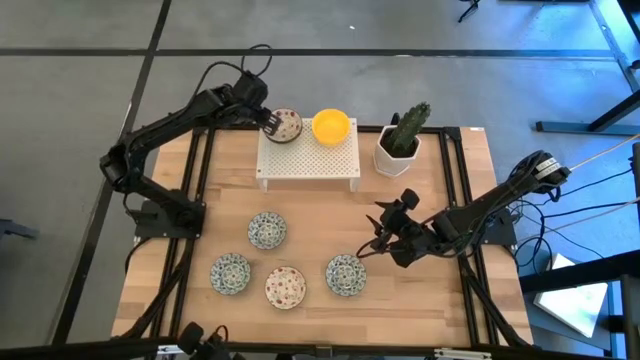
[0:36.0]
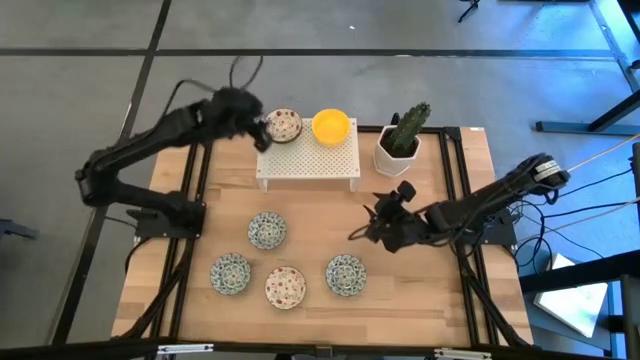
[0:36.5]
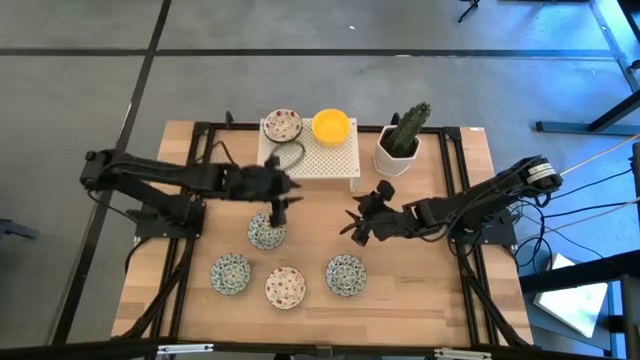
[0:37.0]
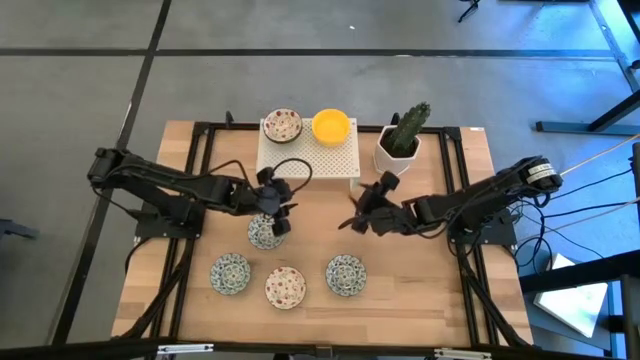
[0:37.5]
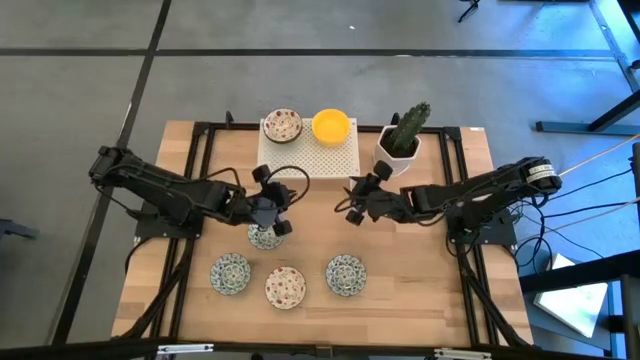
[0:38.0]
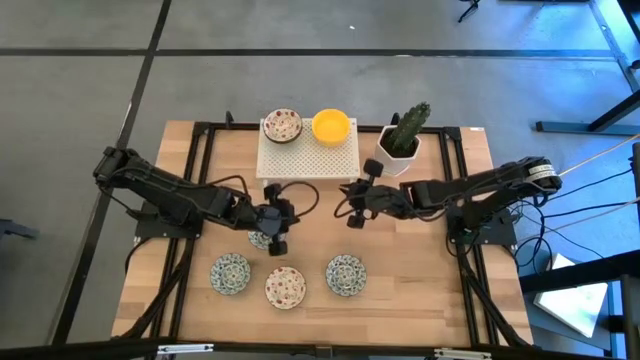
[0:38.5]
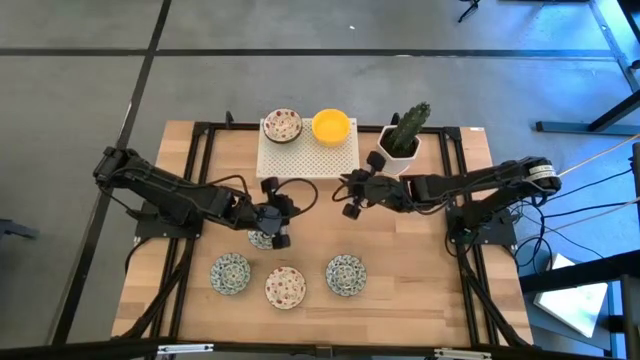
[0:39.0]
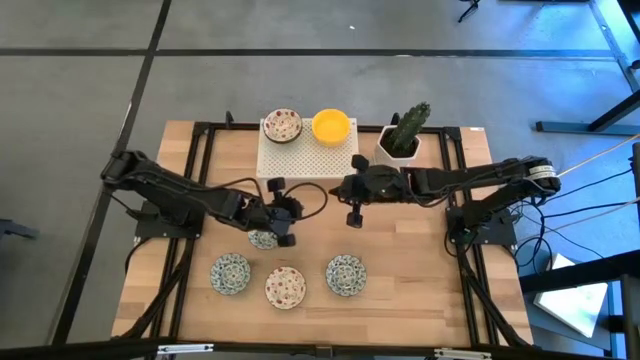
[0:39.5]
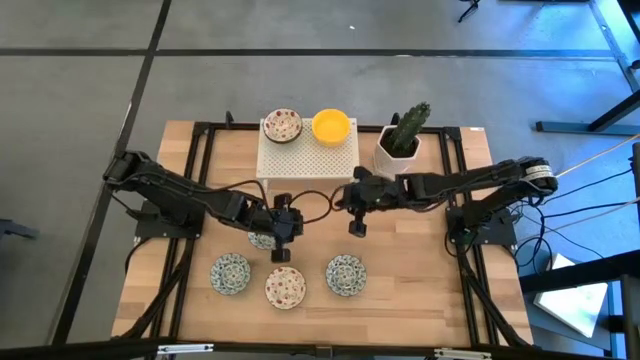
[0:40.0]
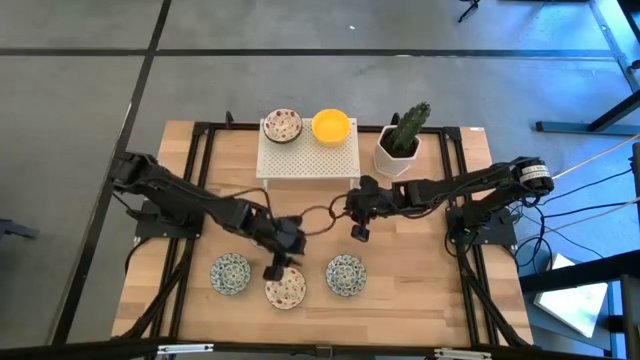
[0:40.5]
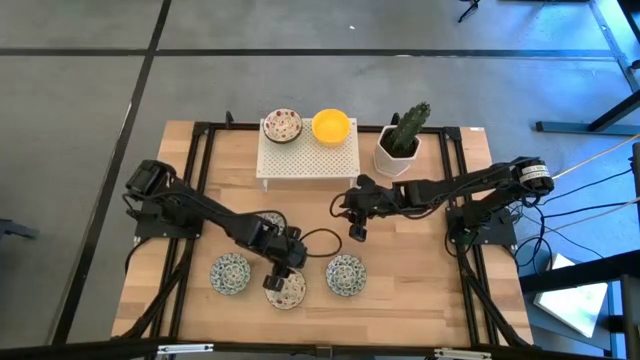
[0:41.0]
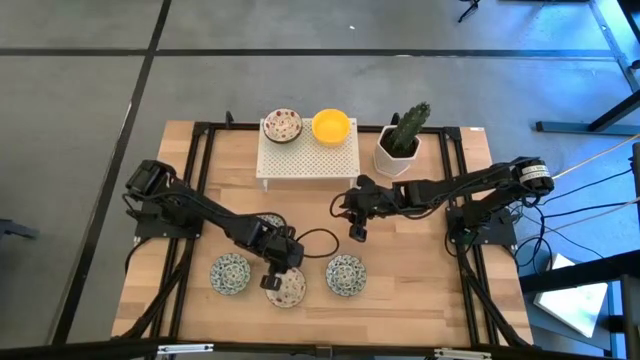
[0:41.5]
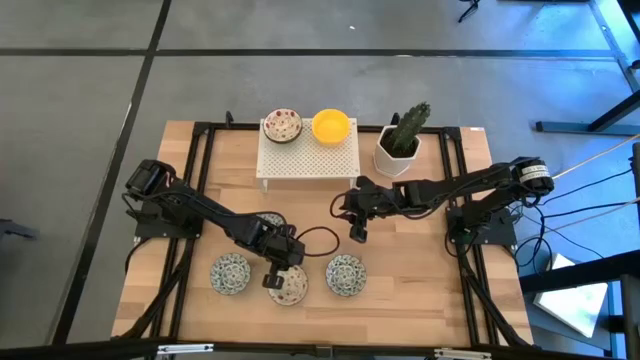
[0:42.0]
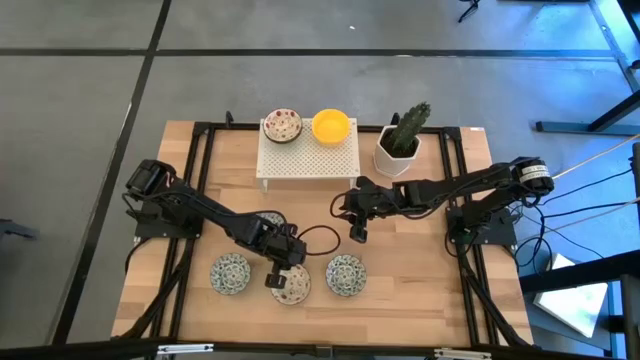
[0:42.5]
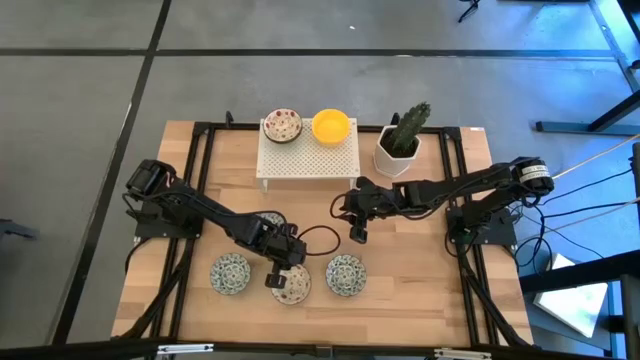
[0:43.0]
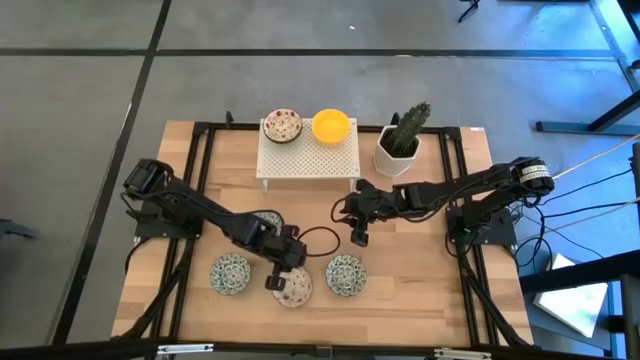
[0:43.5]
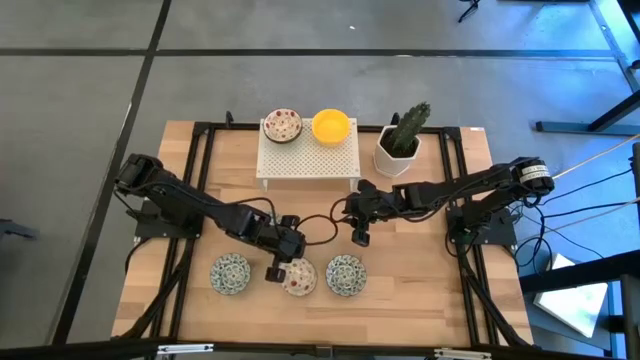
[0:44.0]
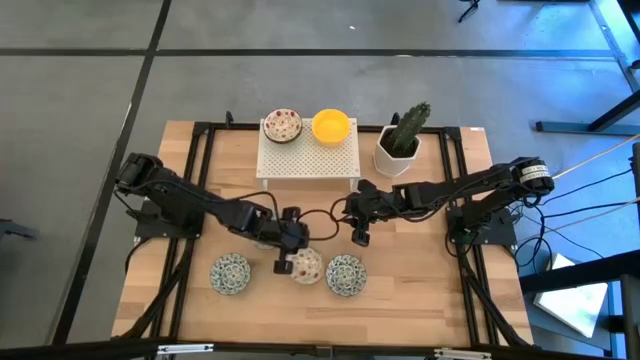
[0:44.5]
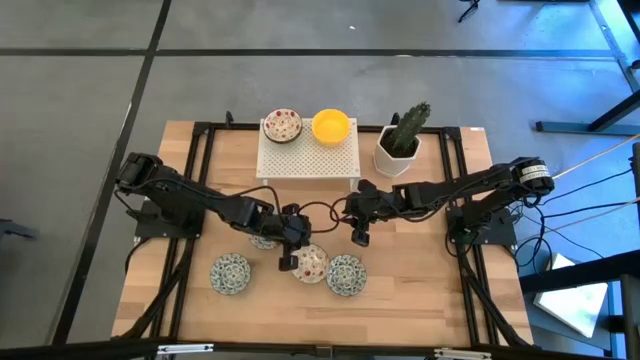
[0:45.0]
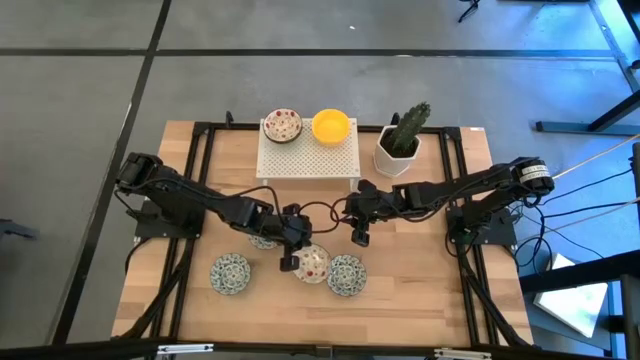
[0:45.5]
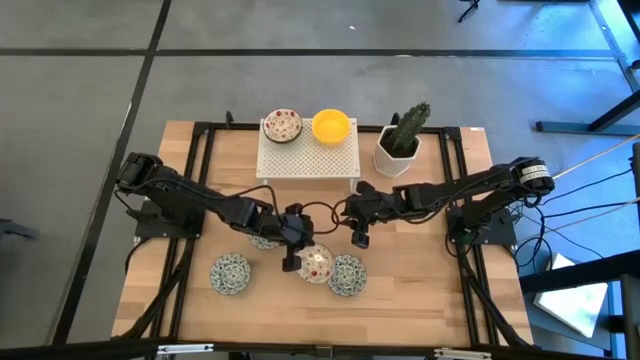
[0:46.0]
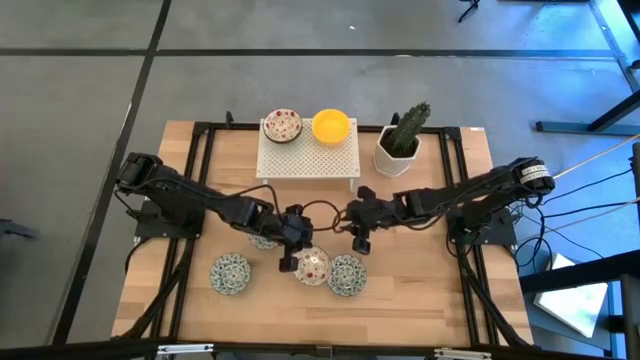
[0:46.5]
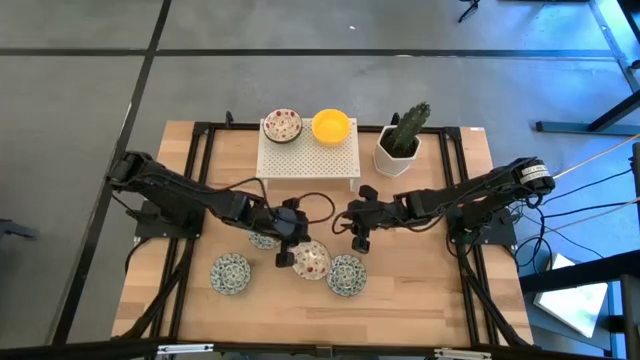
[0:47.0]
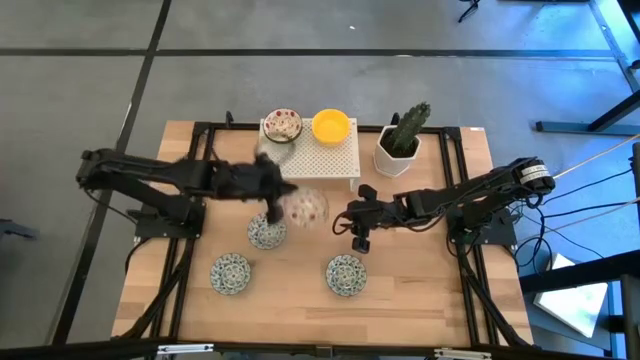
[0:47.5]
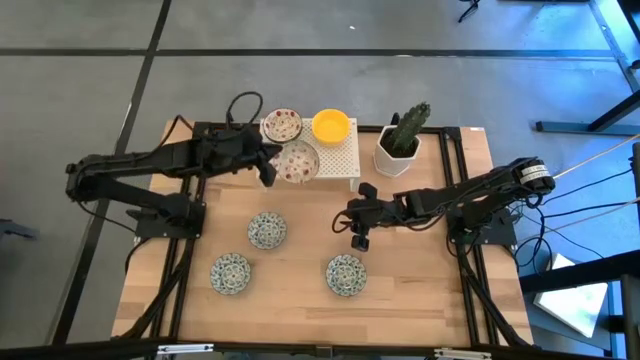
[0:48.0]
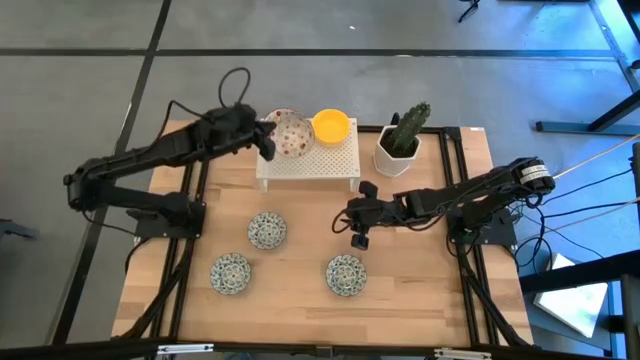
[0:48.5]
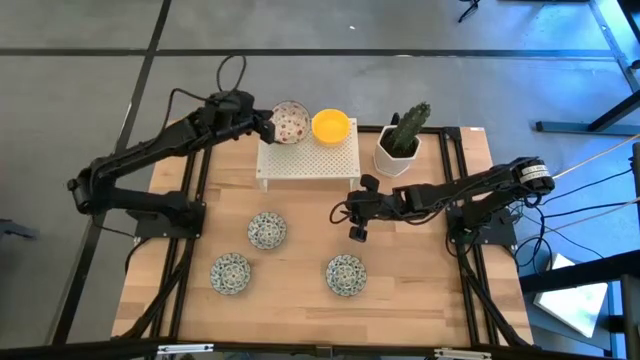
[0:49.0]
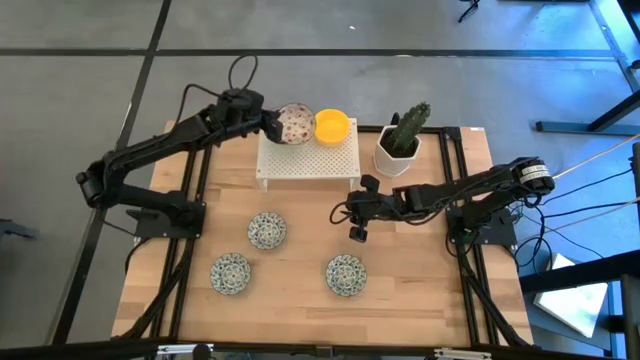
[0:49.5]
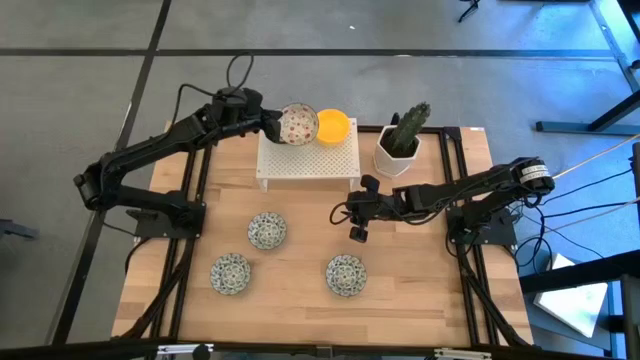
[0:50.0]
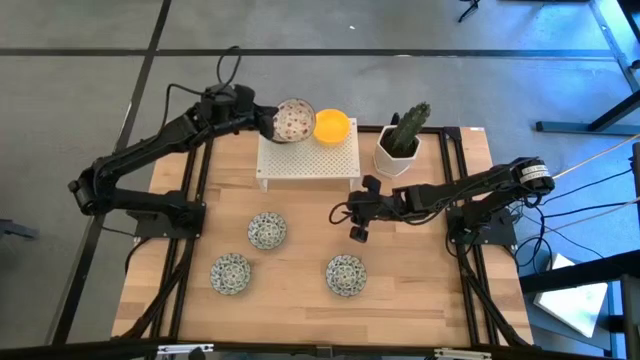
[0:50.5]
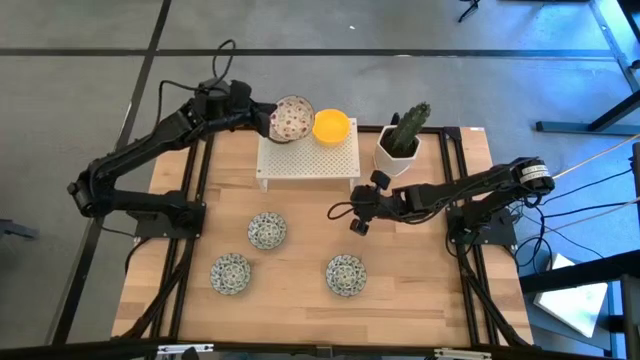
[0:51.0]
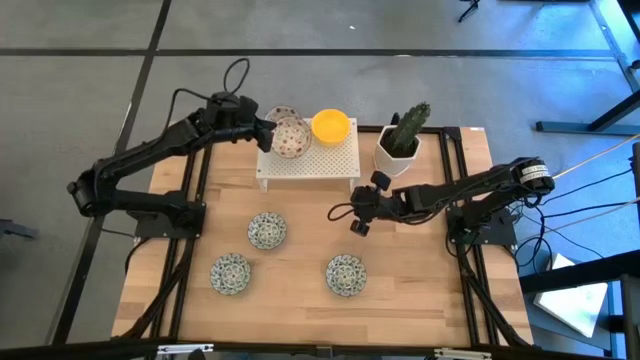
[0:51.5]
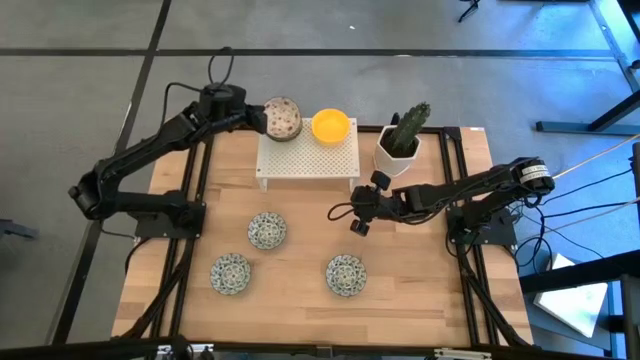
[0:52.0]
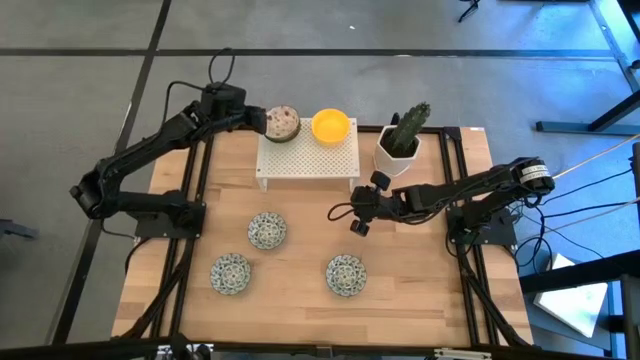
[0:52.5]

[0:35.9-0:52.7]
Task: Pick & Place Mini bowls
Stack the green patterned bowl on top of the green patterned bowl on the shelf

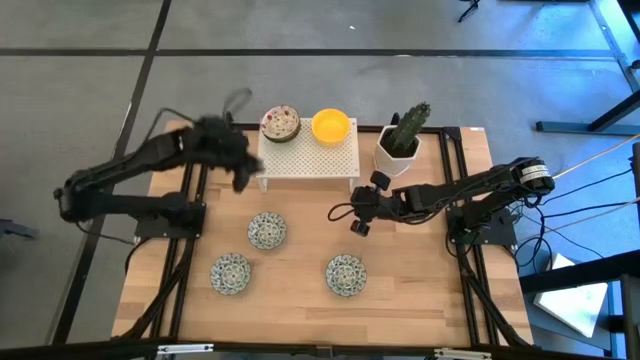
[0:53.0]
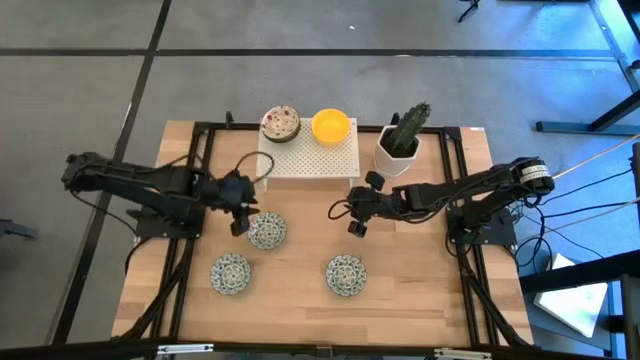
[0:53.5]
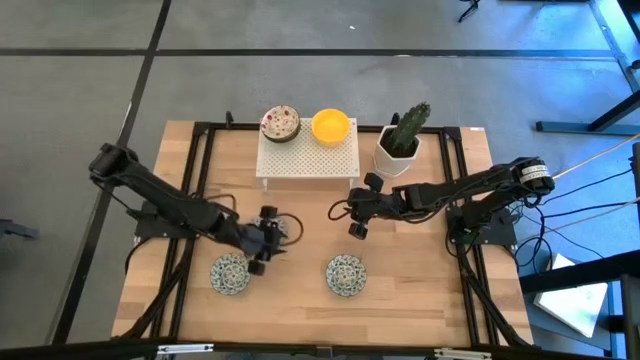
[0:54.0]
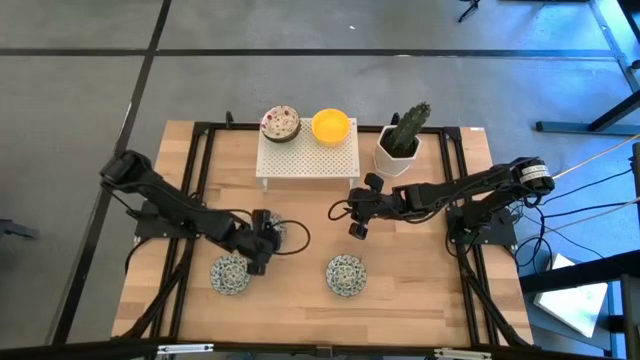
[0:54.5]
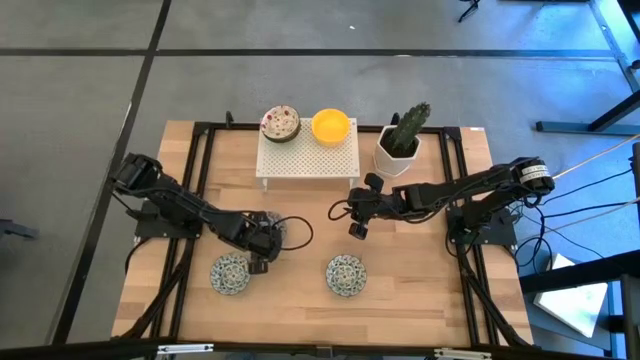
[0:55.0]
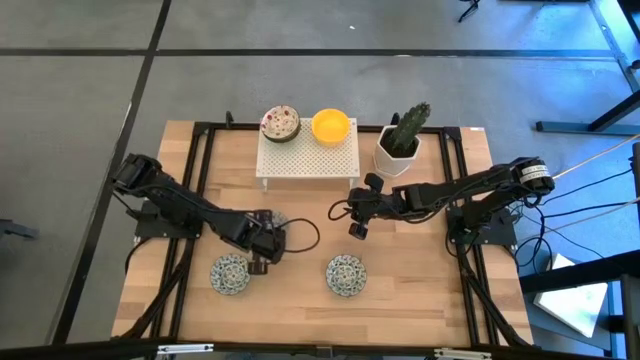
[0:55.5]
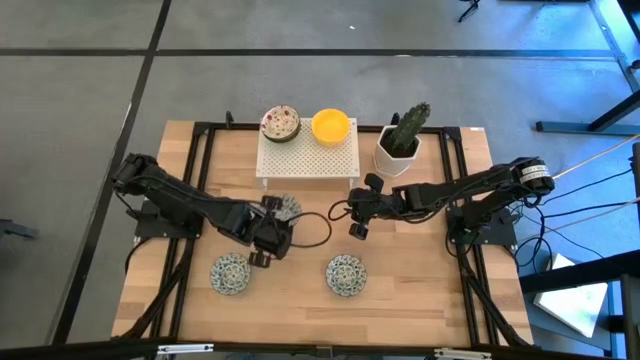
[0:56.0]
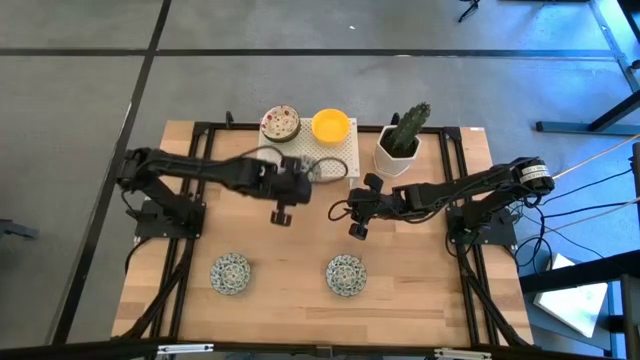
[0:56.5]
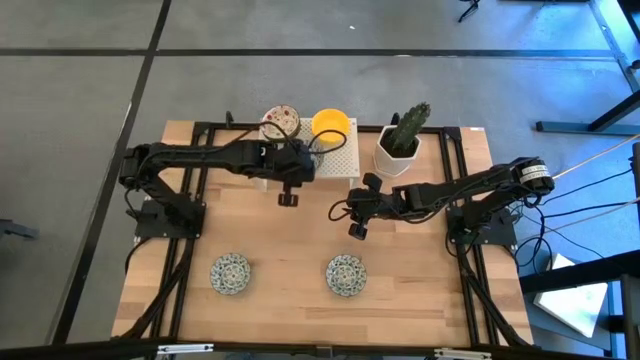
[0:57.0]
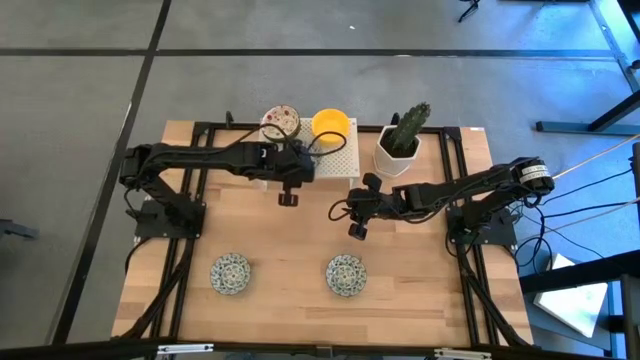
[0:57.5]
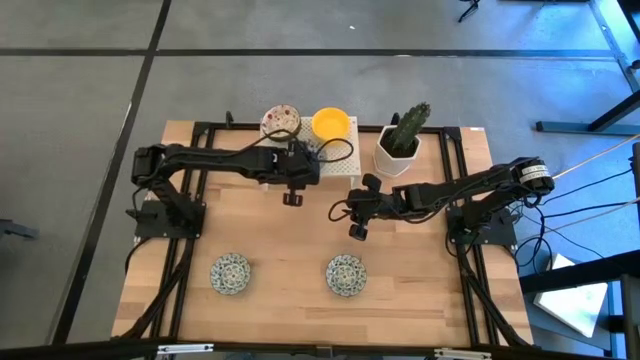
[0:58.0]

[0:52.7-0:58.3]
Put the top blue patterned bowl on the shelf
